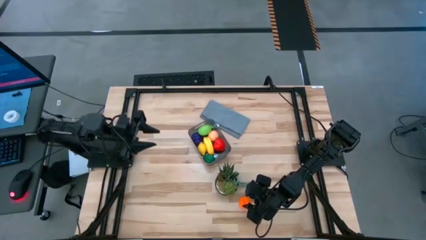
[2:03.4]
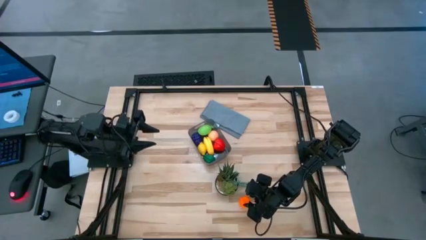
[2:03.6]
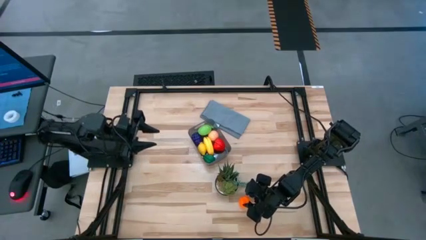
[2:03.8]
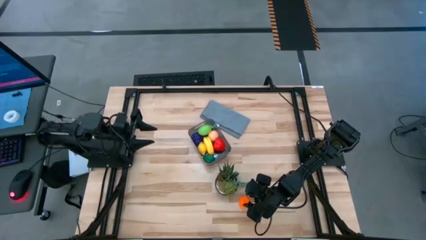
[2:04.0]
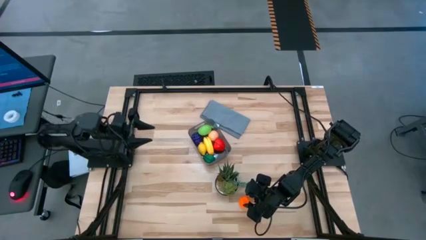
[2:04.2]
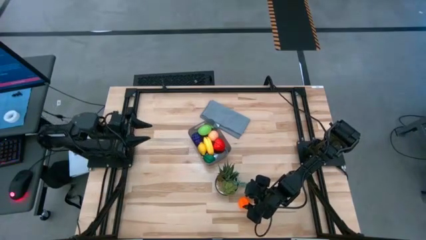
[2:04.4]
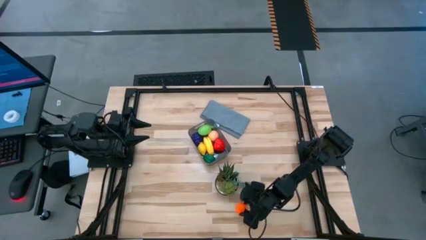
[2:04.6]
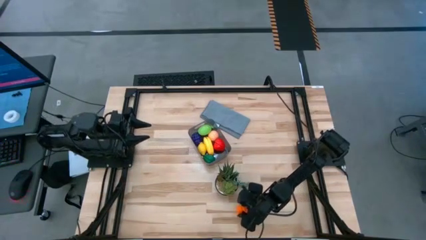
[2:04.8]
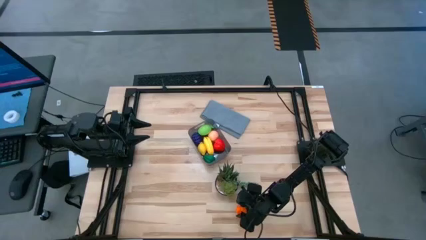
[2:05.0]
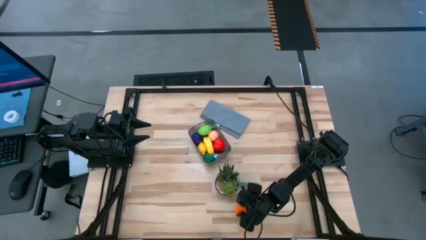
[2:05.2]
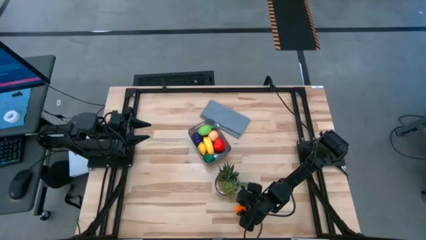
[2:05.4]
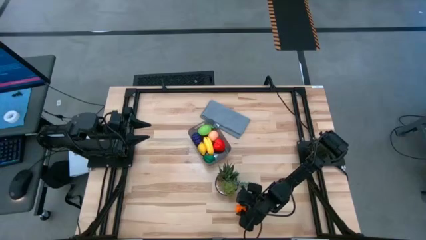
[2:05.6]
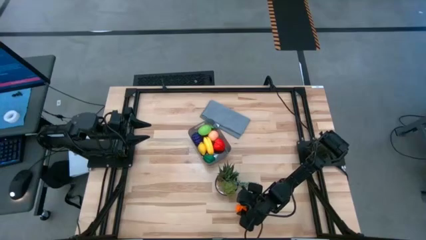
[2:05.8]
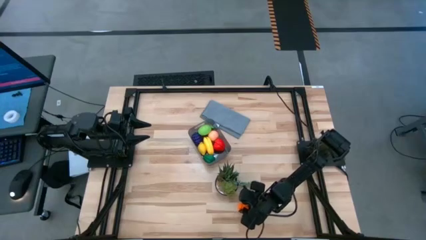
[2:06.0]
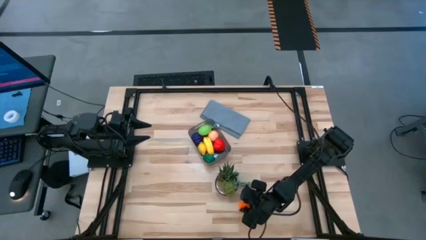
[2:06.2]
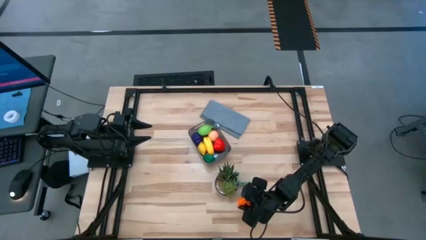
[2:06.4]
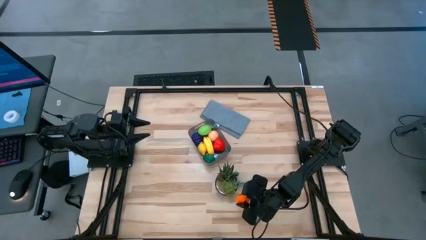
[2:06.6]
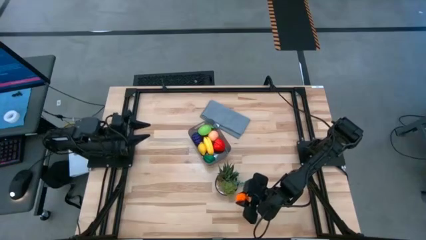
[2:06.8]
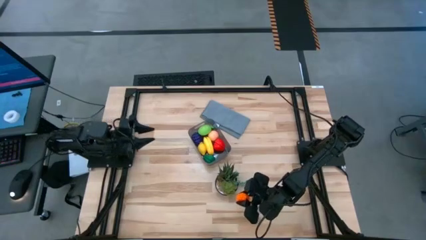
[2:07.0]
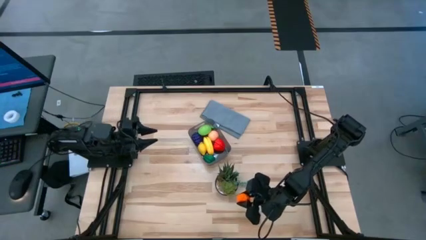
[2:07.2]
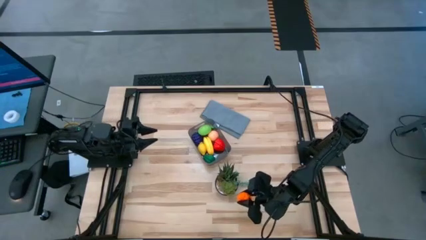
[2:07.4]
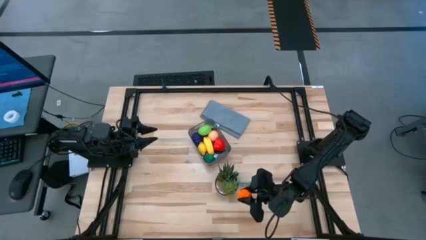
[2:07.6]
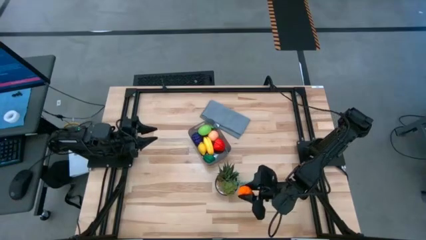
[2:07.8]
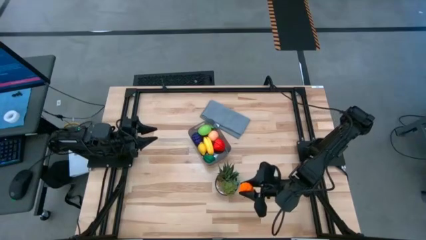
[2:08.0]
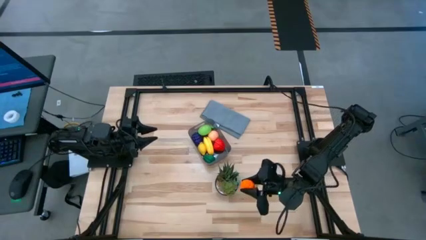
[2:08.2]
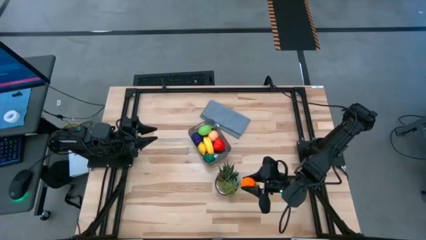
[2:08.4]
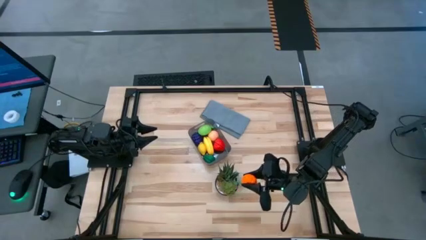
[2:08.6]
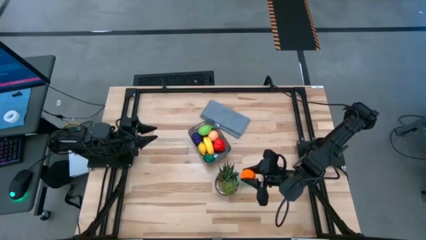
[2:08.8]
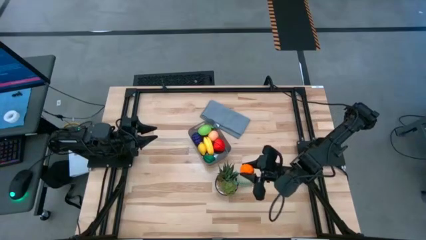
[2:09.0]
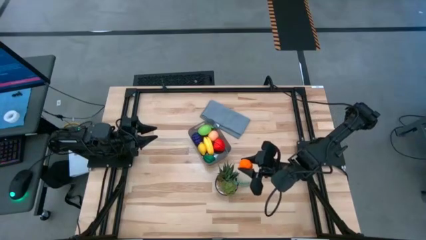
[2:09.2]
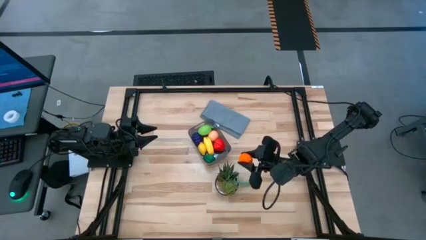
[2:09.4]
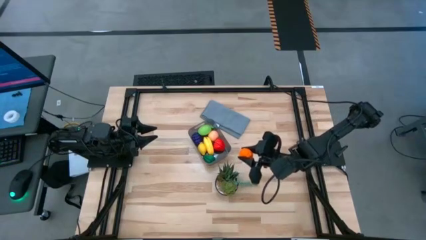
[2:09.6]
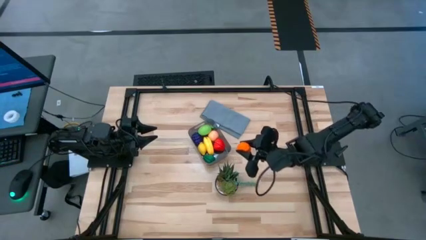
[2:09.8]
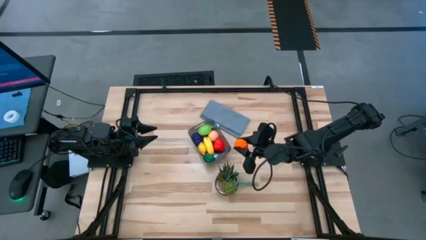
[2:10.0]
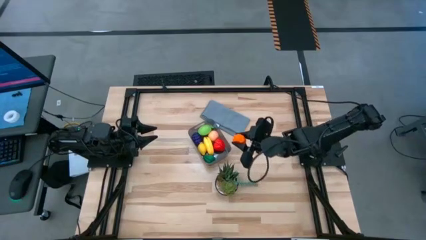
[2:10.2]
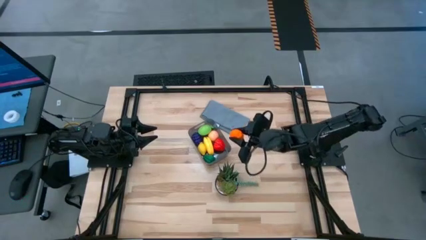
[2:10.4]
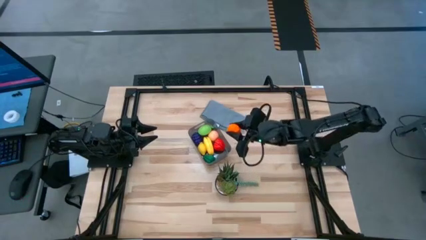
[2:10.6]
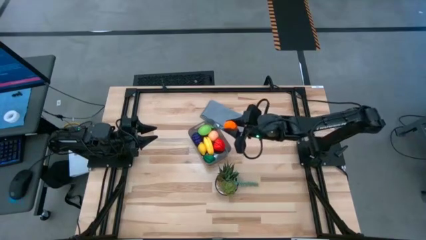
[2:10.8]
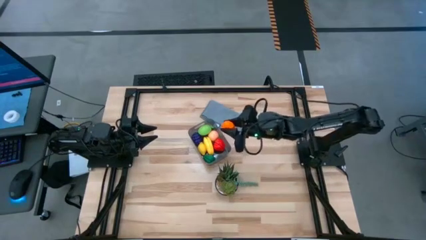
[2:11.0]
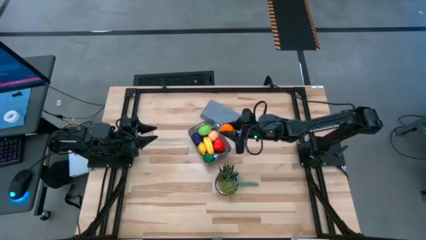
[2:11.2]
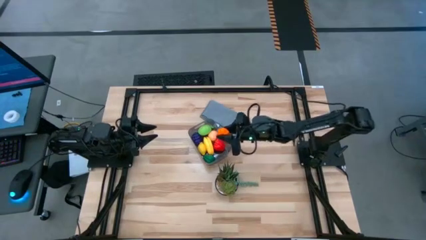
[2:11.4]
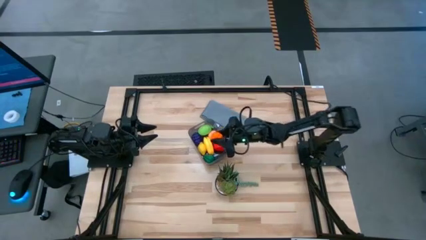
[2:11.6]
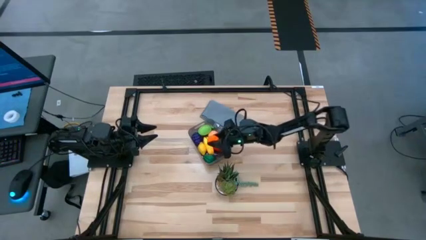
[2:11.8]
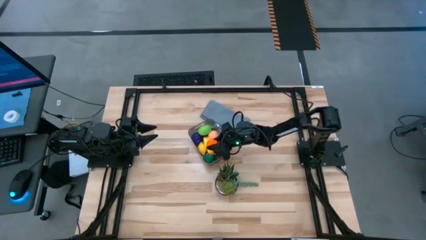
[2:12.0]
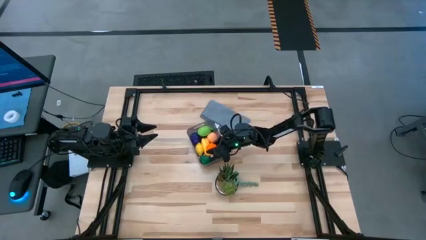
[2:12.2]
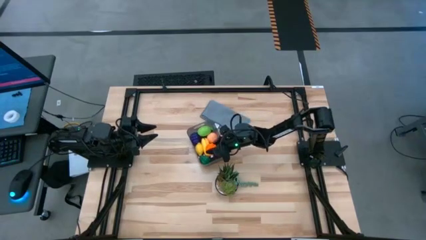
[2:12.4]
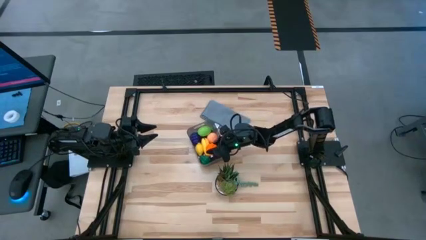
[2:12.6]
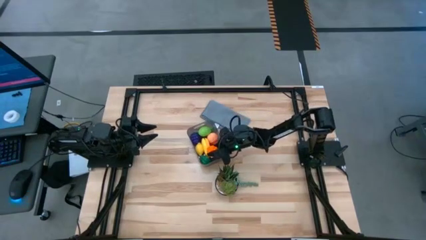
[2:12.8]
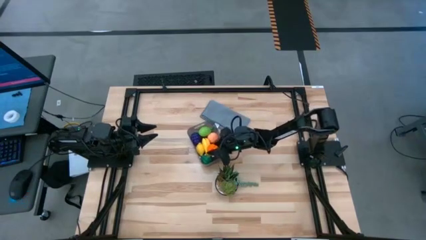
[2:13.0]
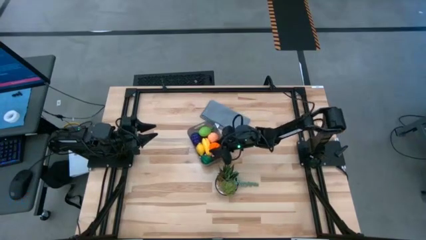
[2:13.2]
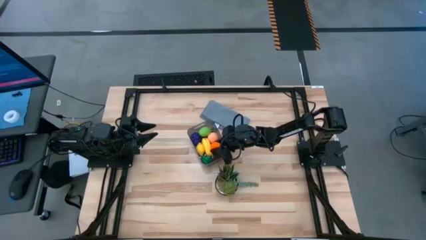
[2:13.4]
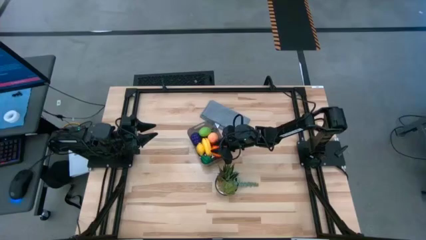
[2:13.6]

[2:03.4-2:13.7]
Task: Pick and placing Produce into tupperware
Put the orange pumpkin into the black bin

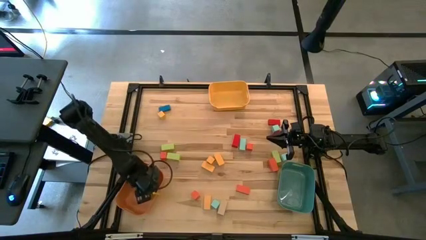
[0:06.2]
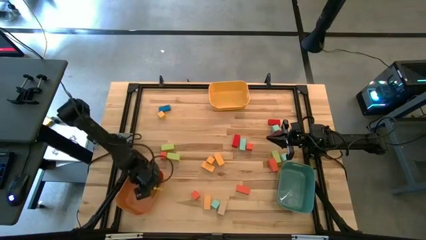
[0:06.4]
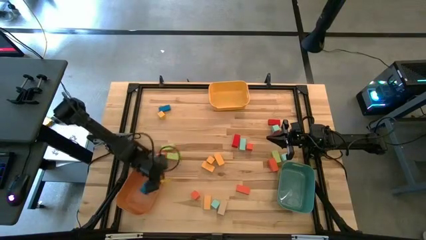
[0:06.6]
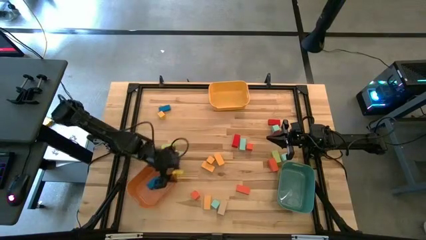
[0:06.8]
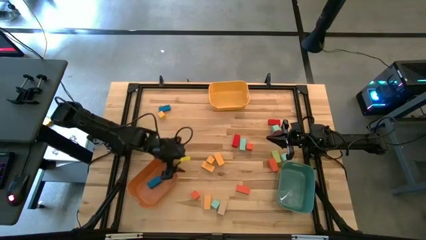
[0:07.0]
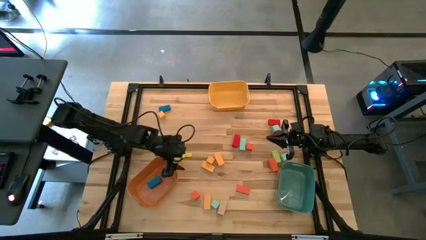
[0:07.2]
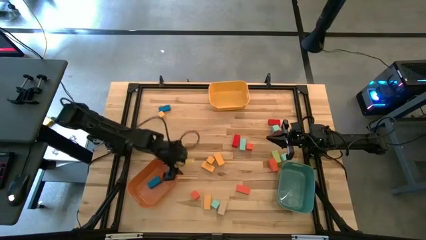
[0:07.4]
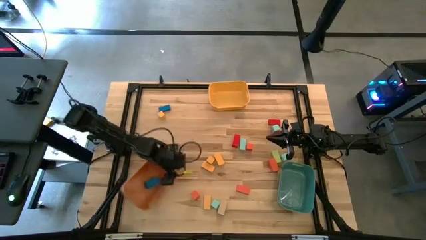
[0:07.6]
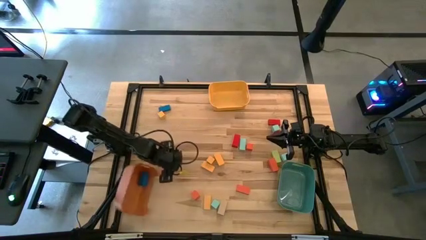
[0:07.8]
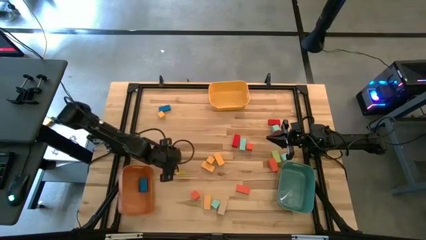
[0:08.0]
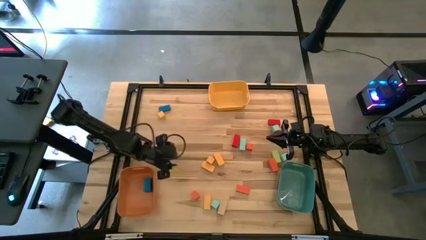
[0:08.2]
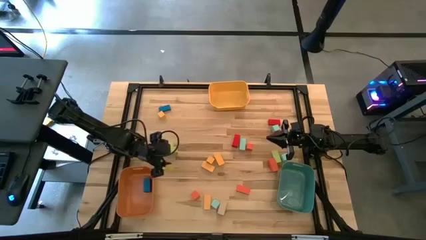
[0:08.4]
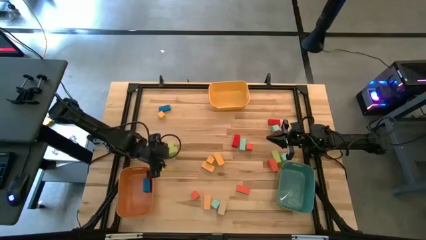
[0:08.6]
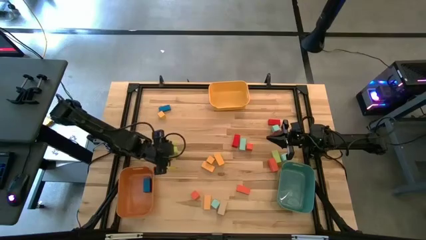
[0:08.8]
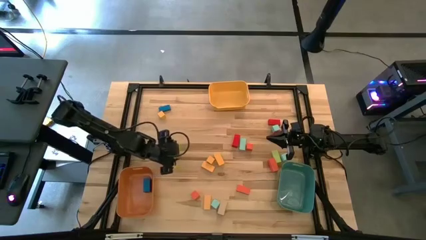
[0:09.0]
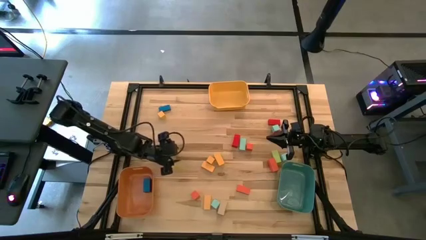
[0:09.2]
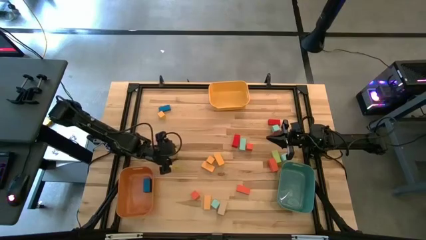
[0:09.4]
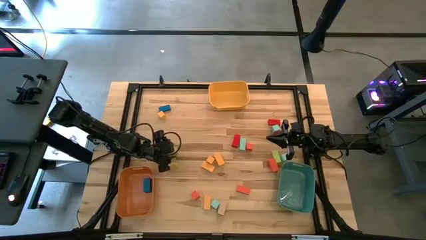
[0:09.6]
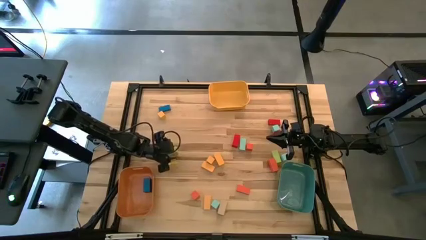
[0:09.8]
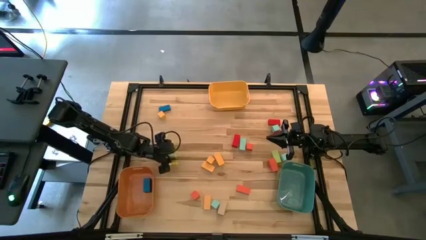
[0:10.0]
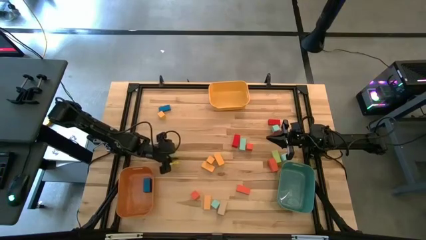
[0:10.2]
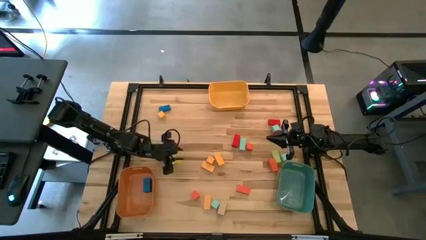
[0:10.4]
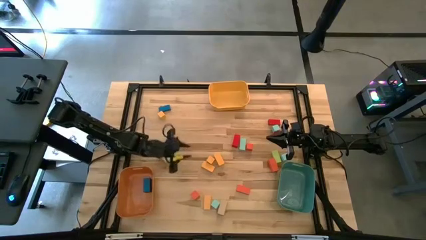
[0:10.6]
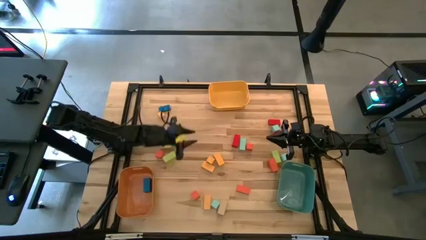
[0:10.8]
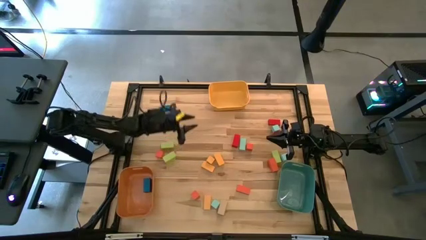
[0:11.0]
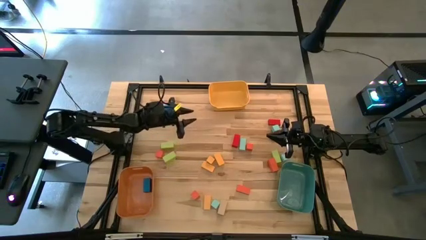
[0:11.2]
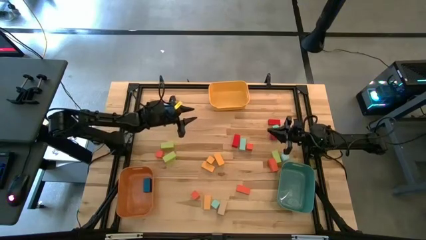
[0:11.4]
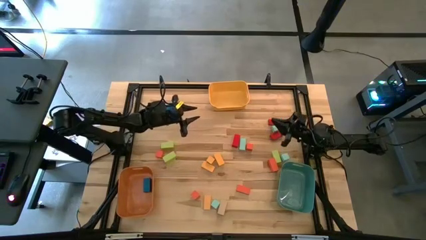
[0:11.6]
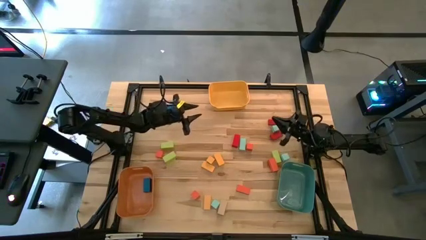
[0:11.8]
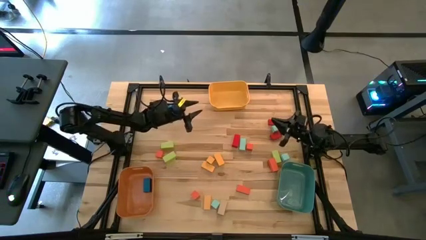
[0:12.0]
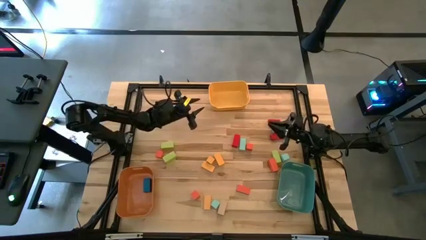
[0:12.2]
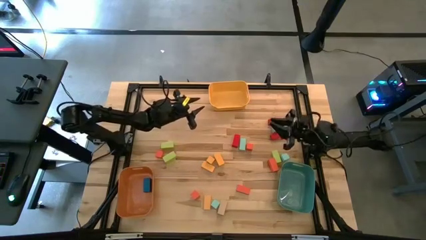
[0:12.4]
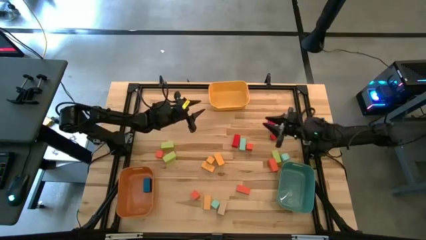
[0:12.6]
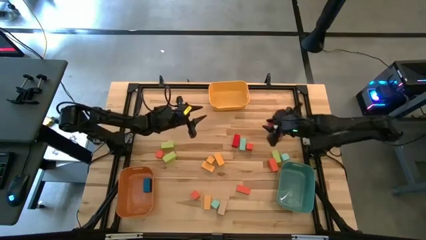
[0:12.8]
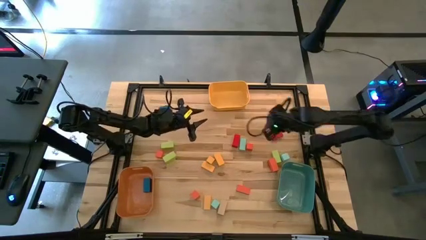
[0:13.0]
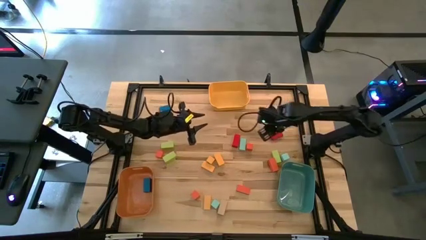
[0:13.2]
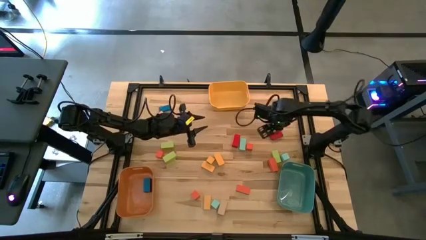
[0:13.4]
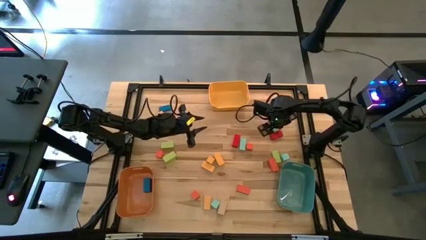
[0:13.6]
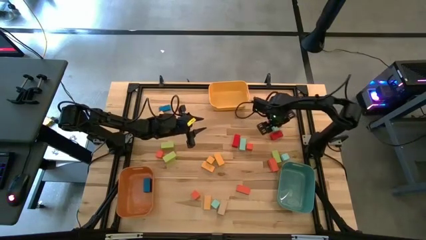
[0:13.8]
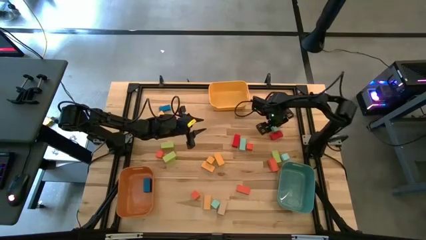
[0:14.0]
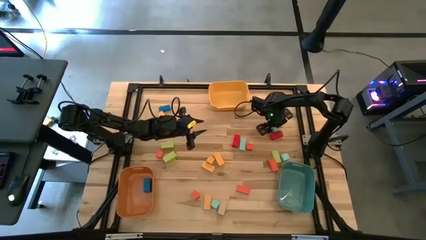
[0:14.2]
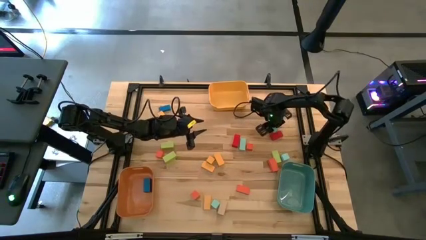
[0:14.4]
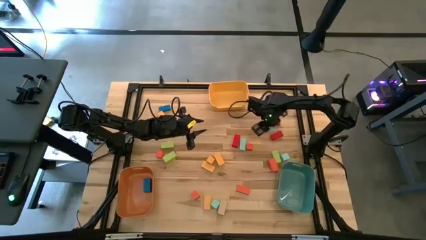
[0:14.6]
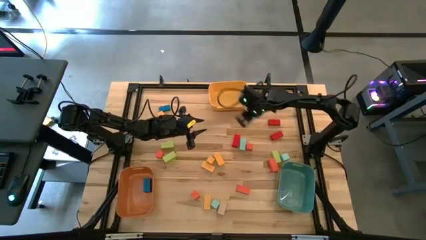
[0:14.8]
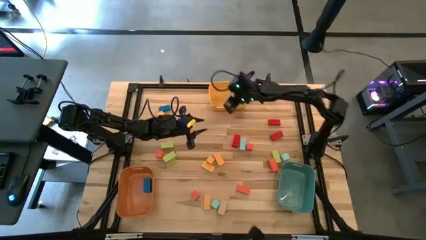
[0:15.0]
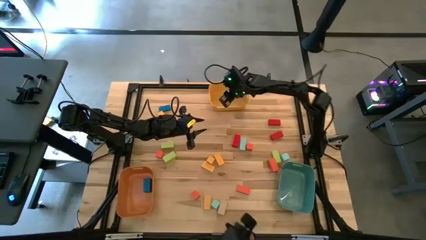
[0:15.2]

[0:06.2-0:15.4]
Task: Sort blocks by size
Put the small light blue block into the yellow bin
